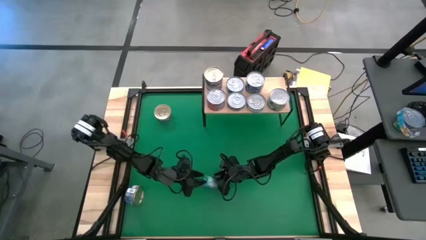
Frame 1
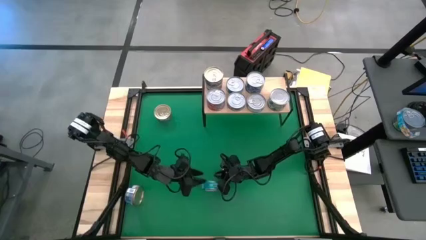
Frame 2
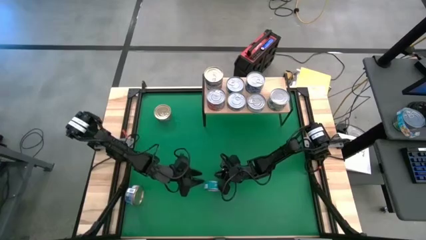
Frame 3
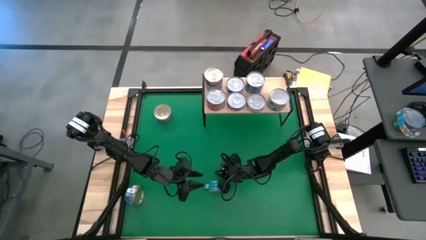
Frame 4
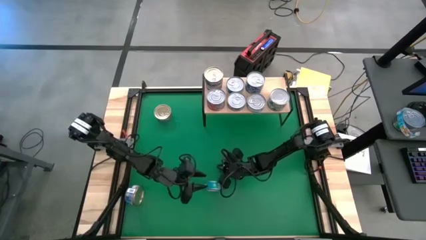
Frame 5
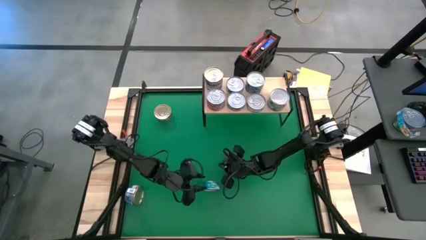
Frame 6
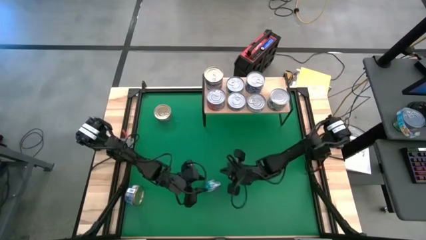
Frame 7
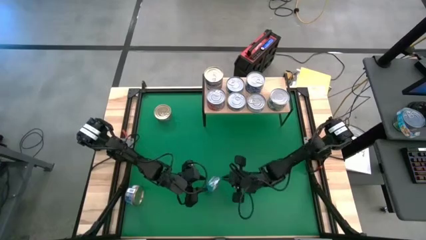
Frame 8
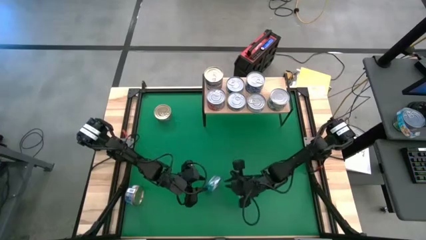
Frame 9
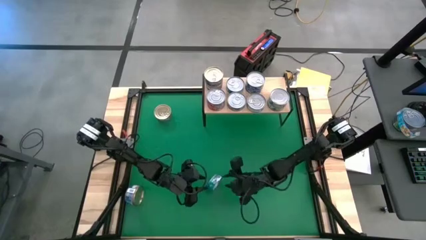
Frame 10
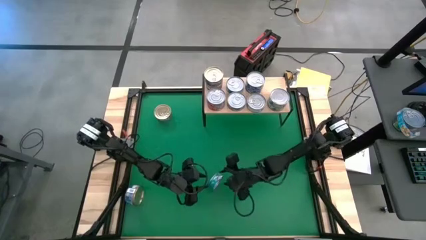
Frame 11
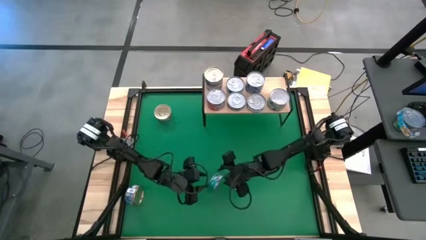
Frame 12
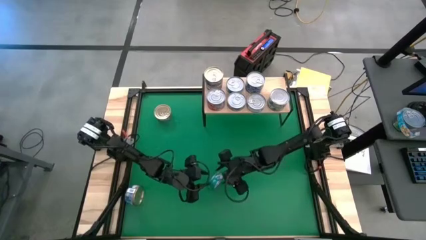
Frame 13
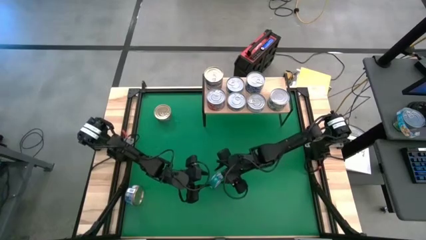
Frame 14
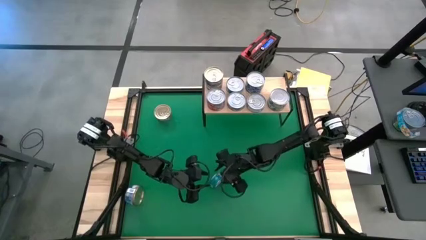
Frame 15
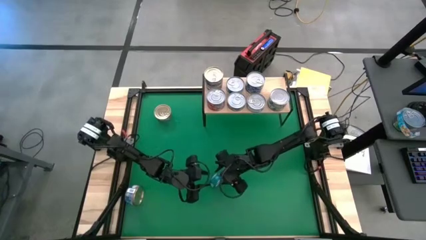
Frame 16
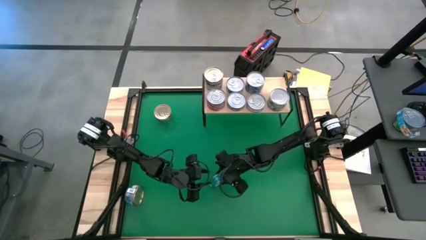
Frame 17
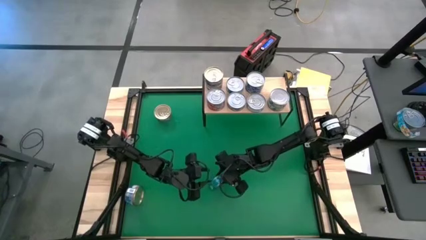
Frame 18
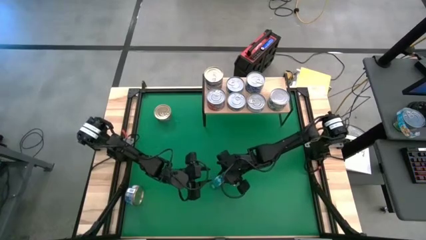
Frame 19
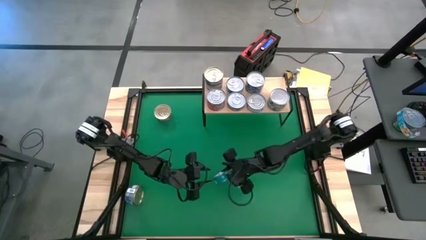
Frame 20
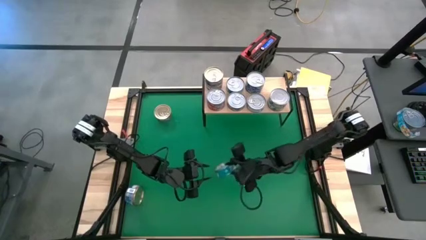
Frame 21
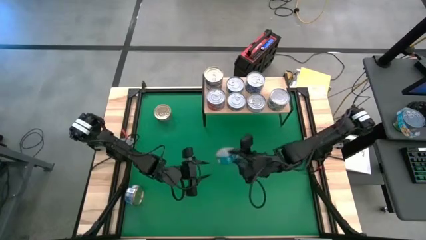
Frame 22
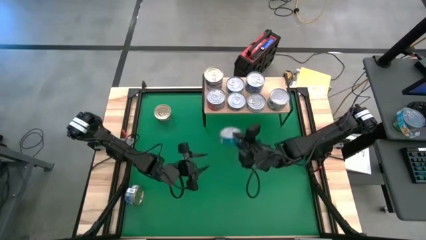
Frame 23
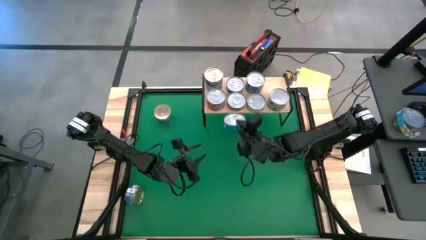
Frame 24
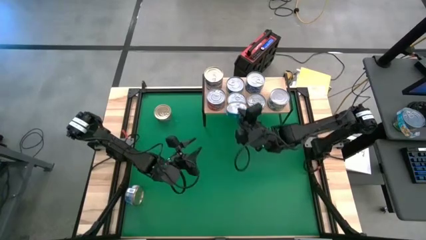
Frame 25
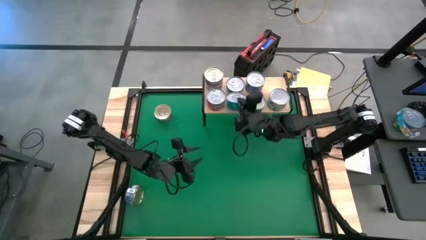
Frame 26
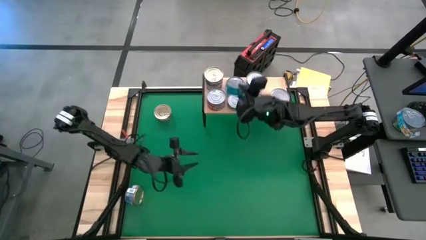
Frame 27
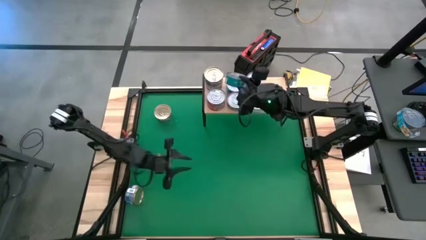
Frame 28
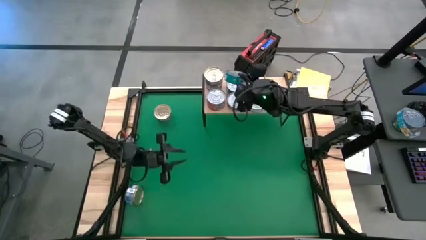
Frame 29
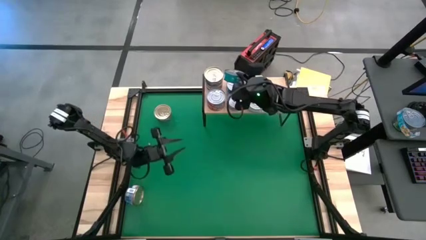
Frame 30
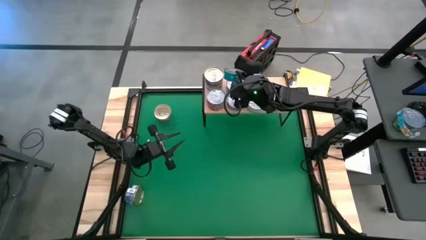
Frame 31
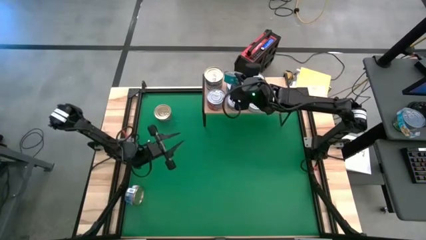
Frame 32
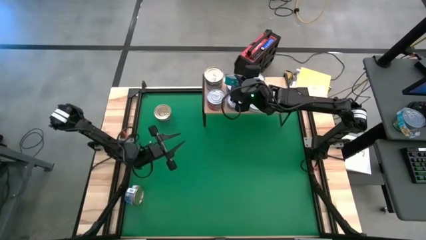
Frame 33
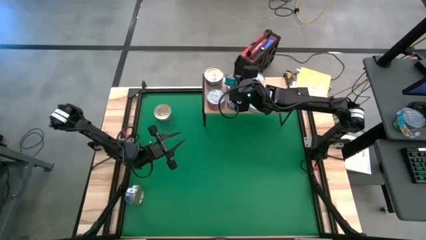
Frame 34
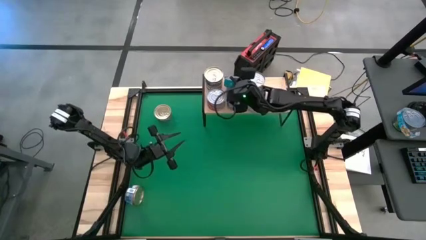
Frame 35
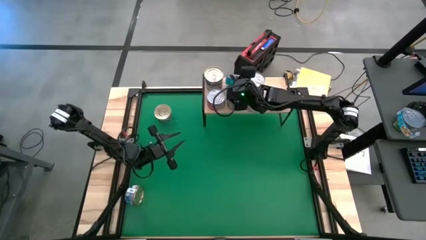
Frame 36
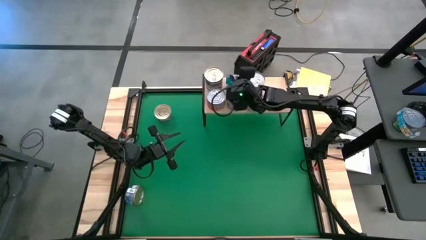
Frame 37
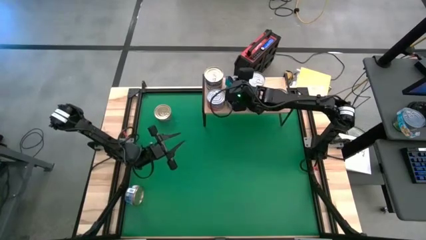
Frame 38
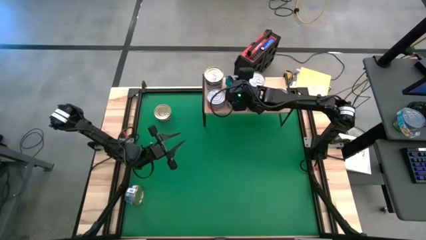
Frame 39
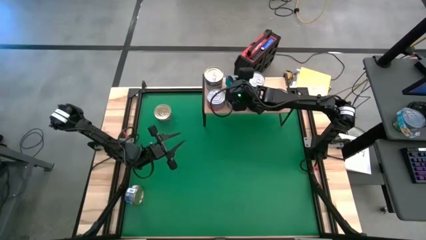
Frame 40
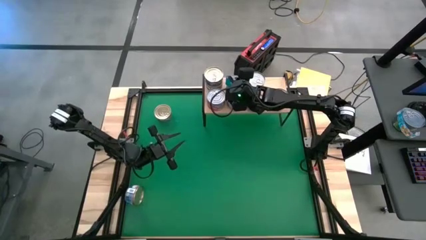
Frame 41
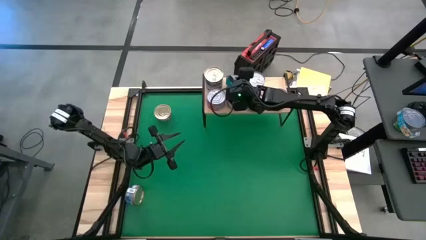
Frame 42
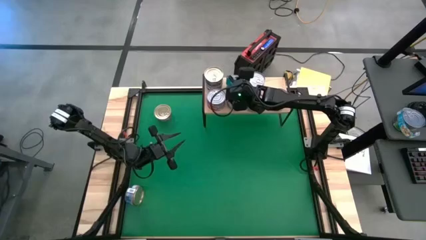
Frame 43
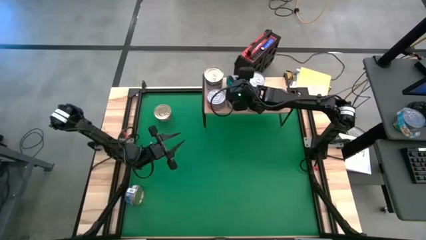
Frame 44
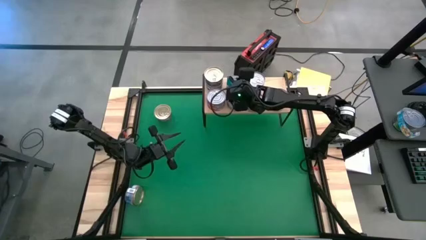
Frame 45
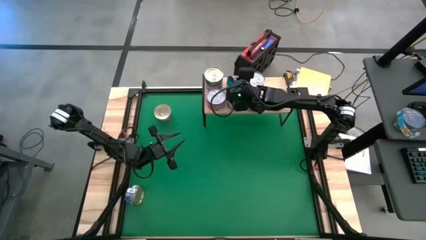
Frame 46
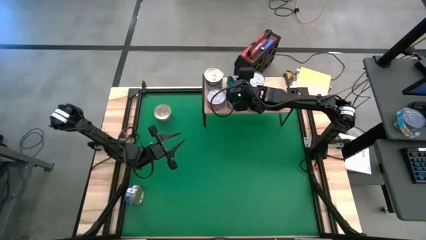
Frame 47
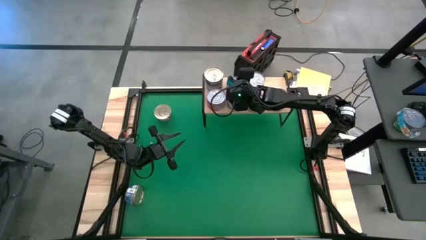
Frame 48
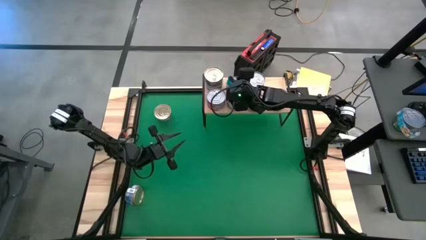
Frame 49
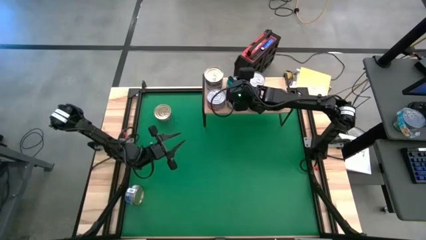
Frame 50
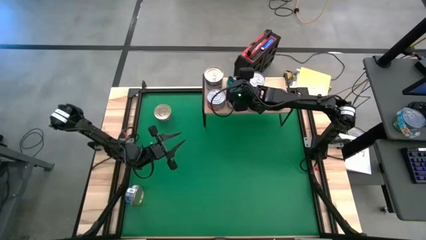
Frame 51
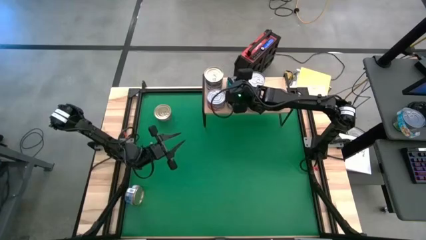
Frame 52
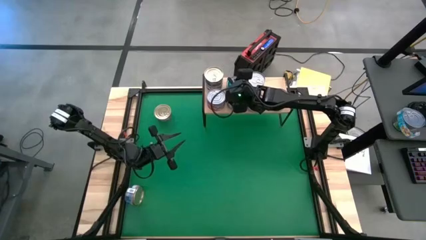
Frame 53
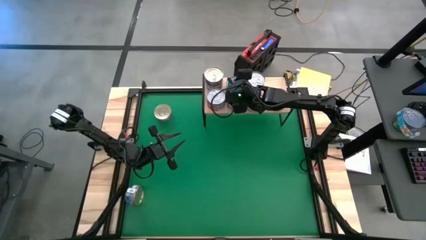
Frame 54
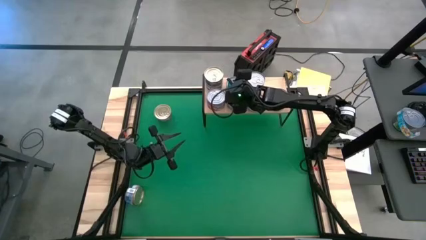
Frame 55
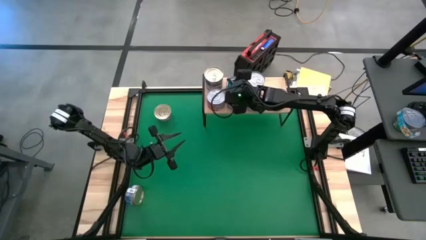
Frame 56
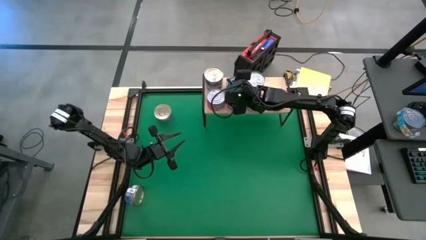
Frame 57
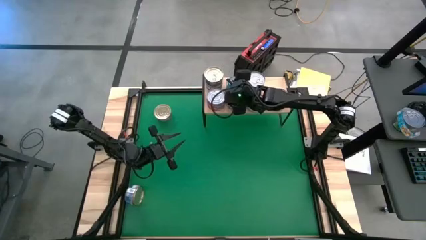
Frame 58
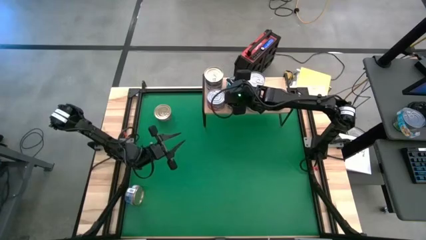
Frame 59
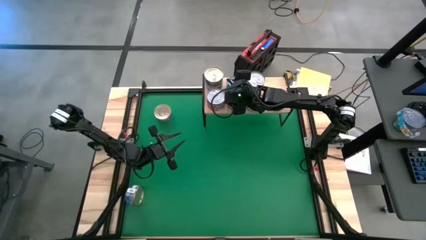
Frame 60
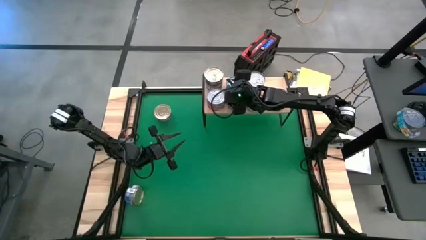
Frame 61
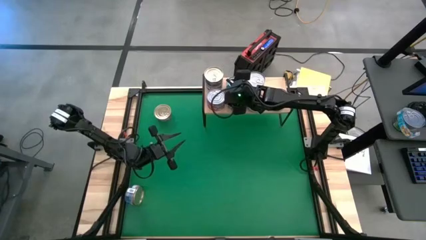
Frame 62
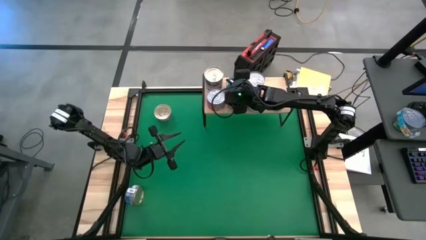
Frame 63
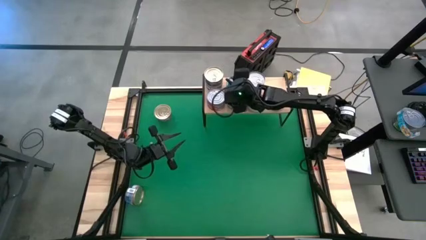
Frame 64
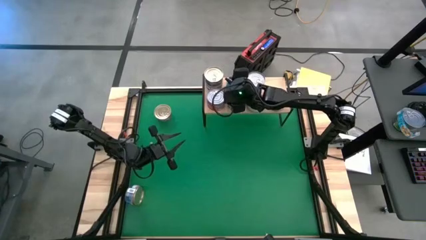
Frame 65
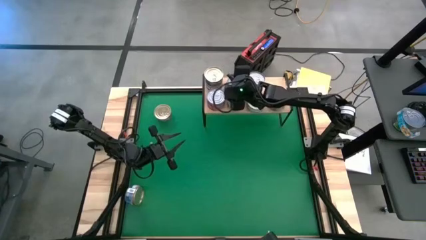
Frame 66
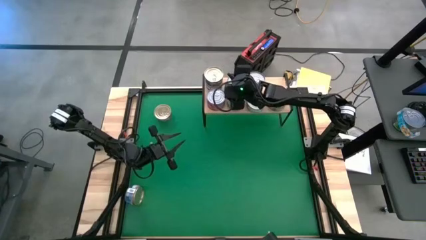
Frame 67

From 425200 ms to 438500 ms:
Task: Stack canned seafood by type on shelf
Stack the green/blue tuna can on top of the other green/blue tuna can on the shelf
